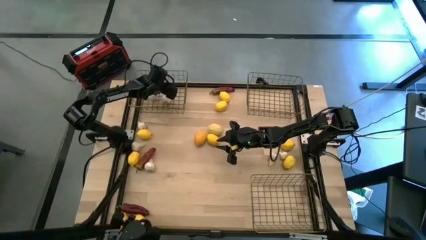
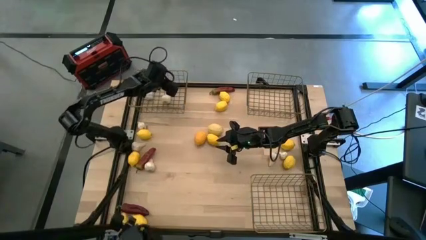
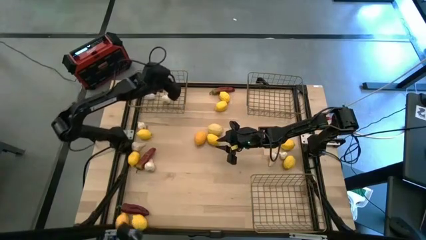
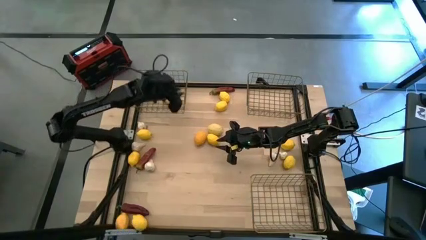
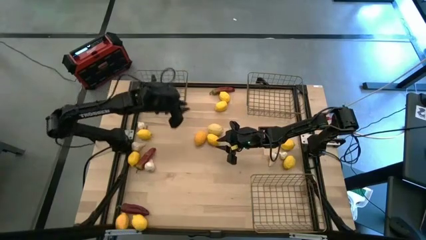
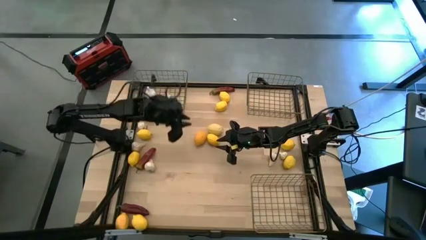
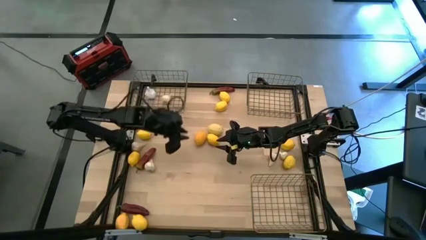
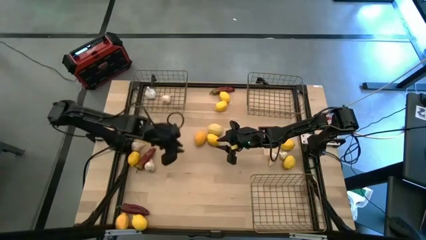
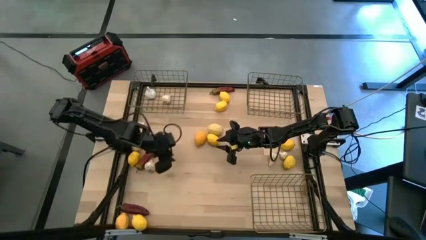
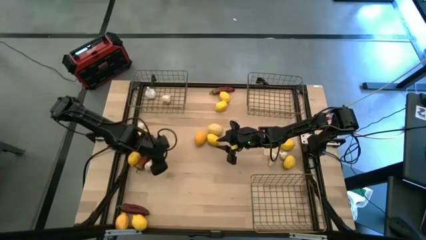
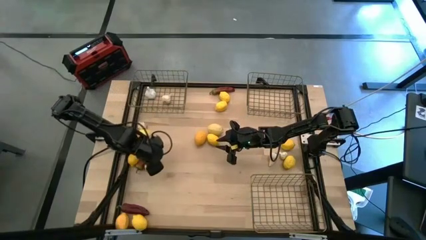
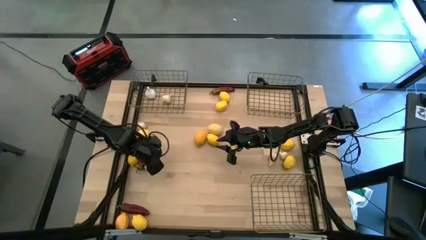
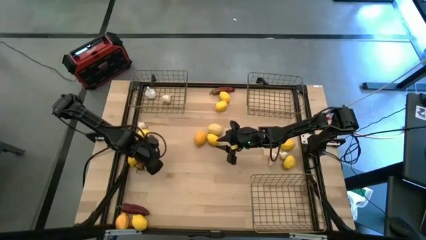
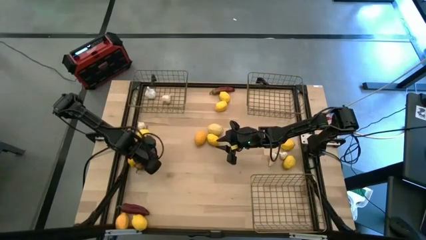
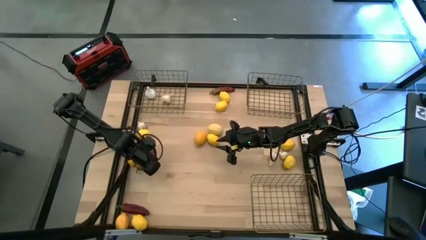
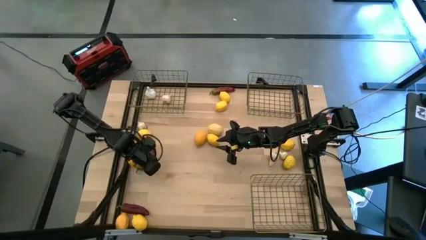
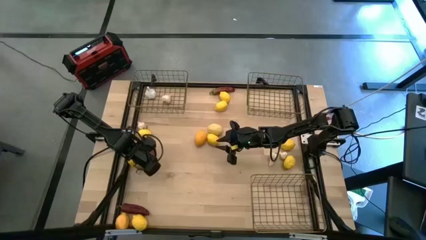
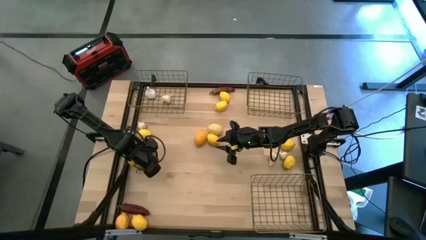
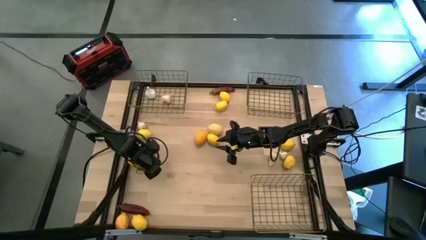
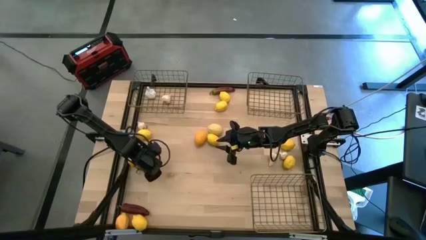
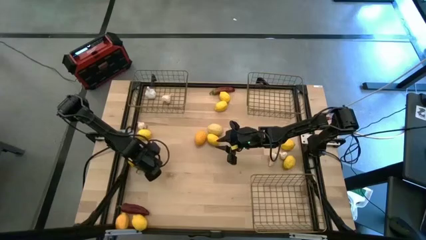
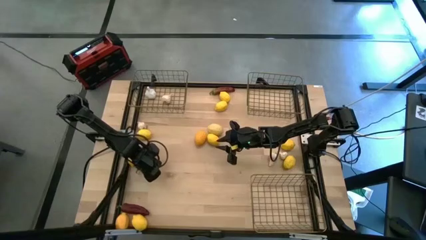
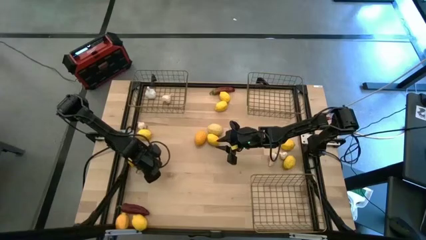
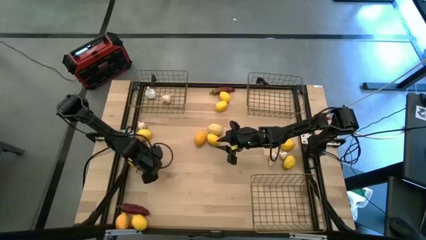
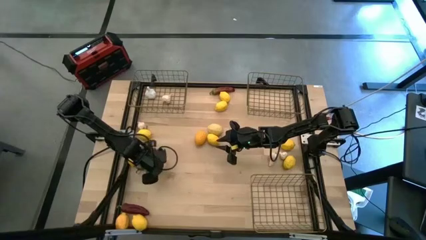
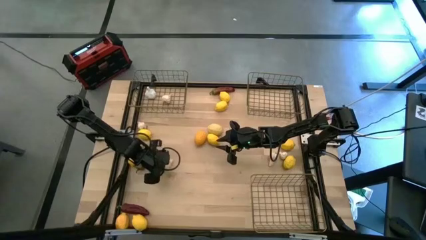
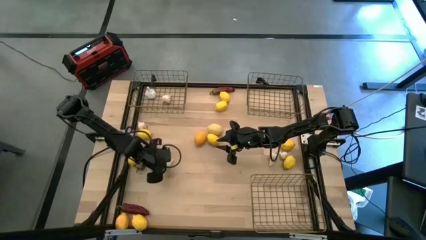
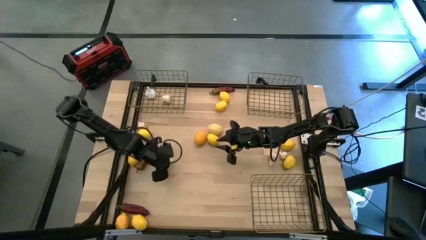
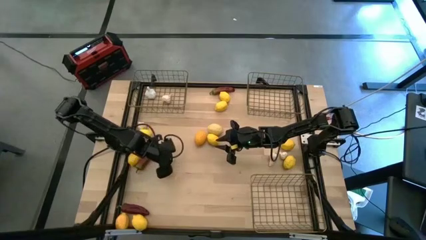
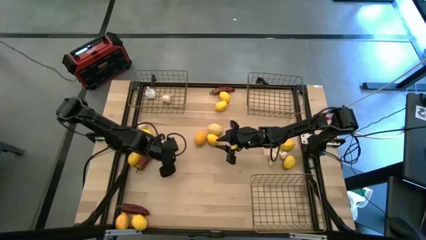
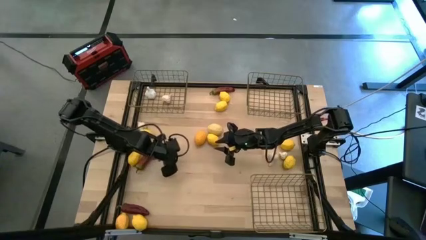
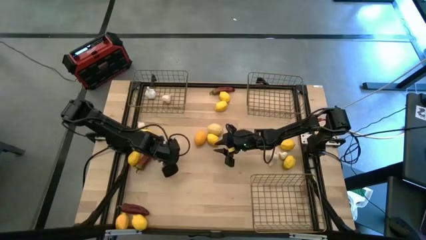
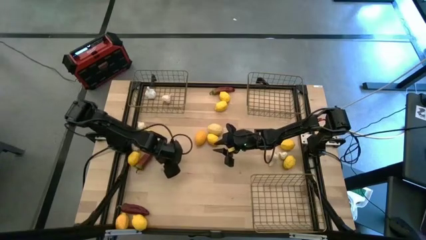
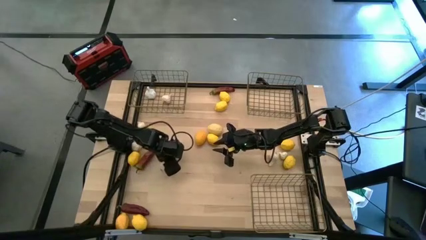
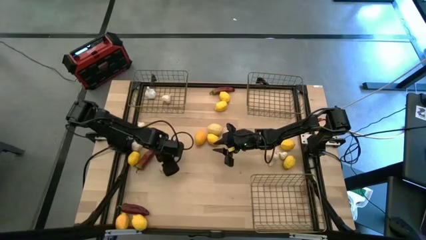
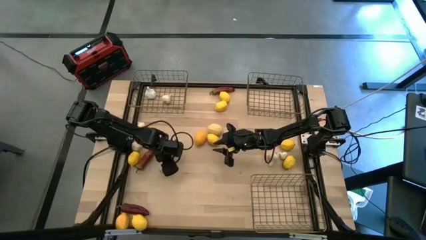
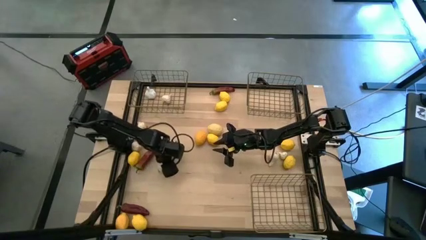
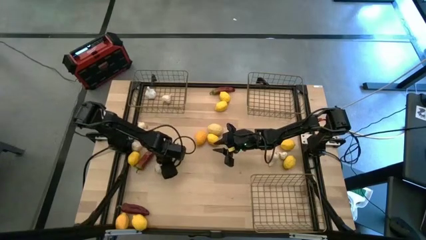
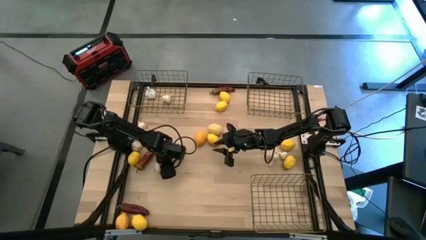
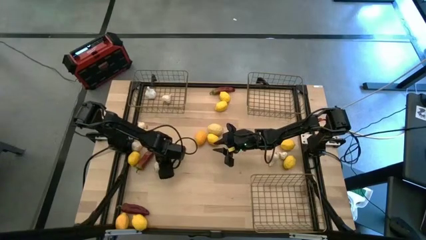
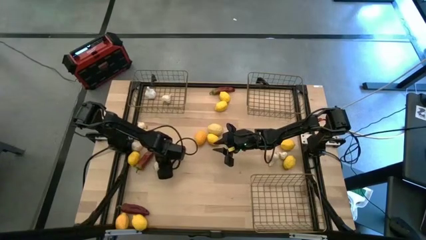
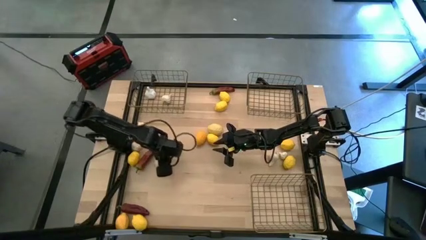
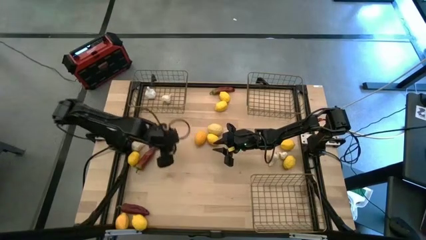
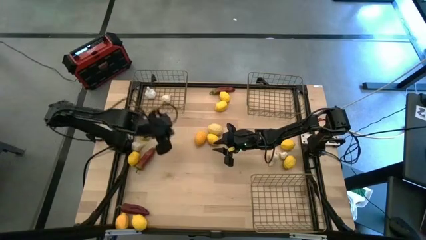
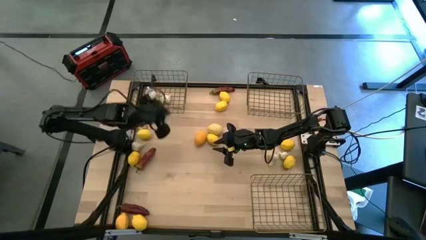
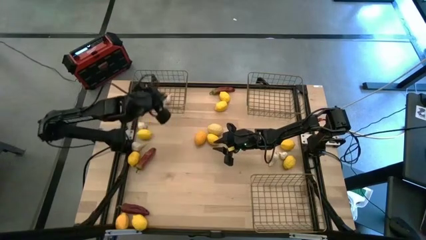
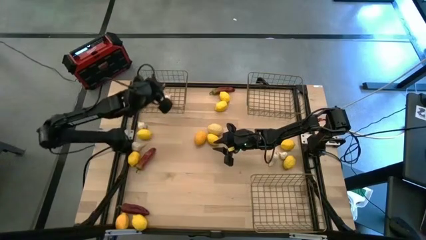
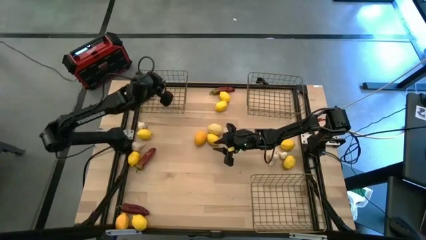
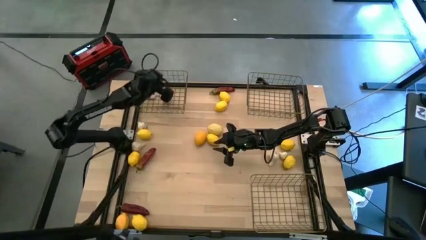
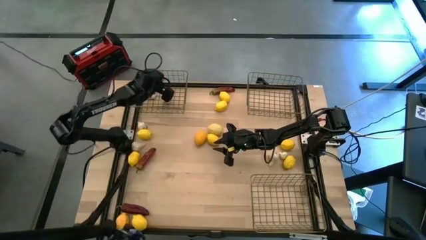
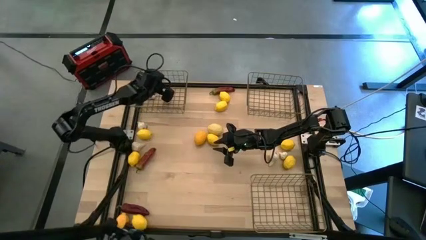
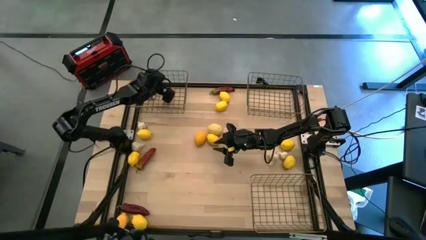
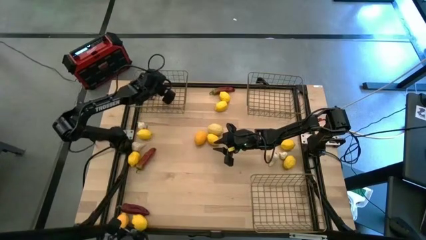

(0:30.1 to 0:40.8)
Task: Sort produce into baskets
Put the white garlic into the top left wire basket
